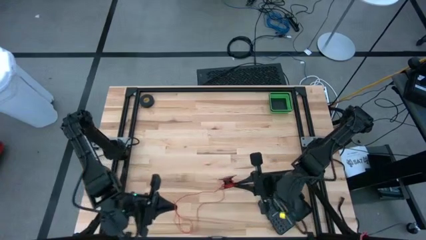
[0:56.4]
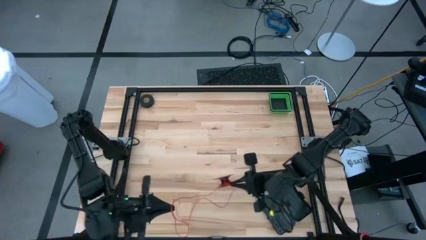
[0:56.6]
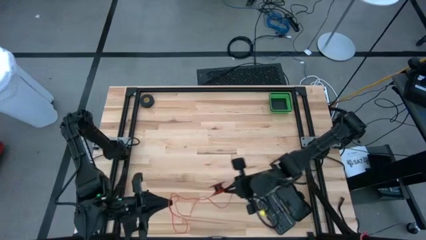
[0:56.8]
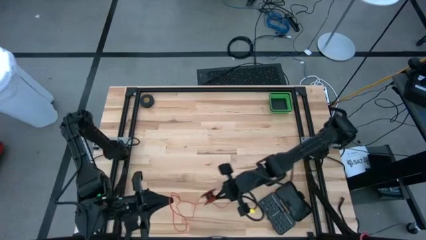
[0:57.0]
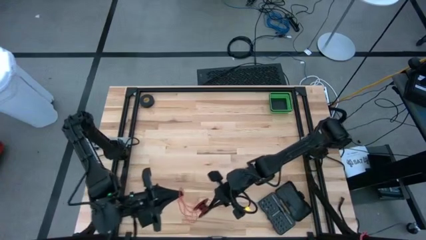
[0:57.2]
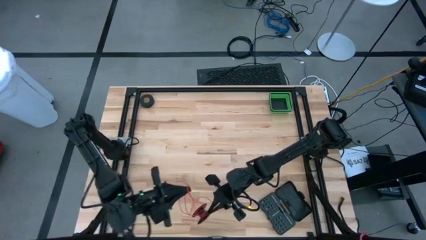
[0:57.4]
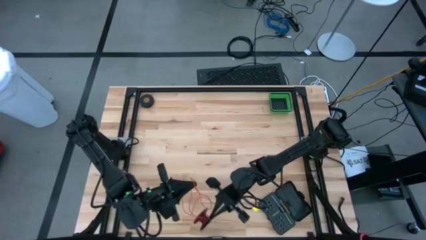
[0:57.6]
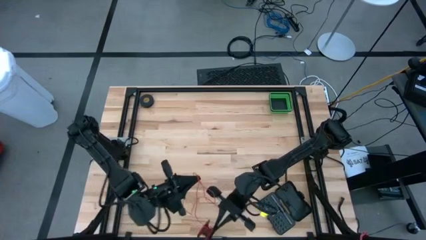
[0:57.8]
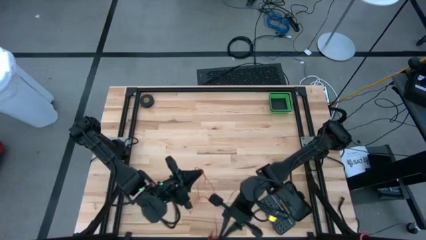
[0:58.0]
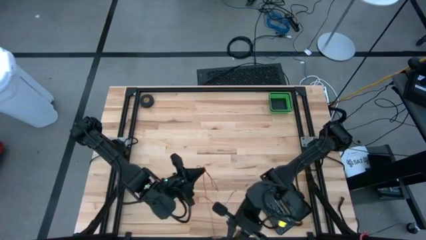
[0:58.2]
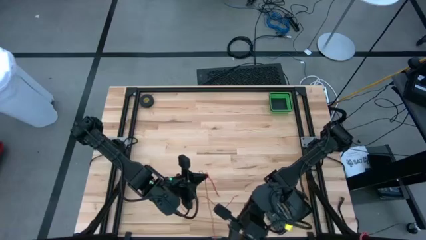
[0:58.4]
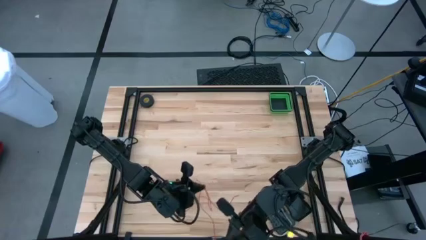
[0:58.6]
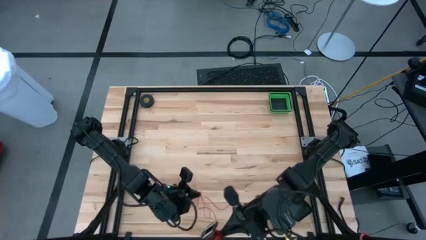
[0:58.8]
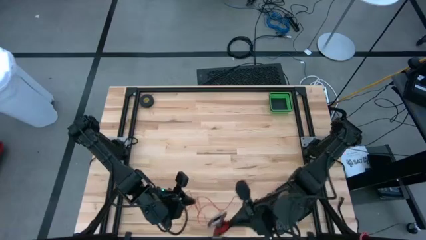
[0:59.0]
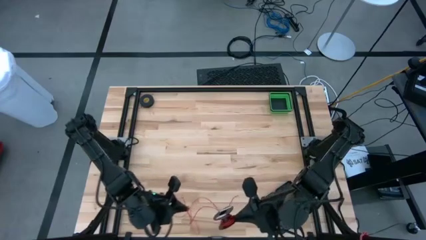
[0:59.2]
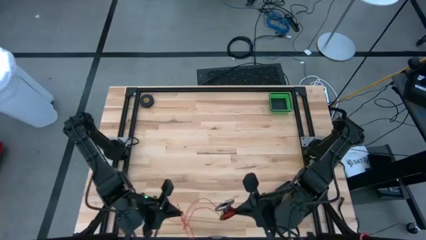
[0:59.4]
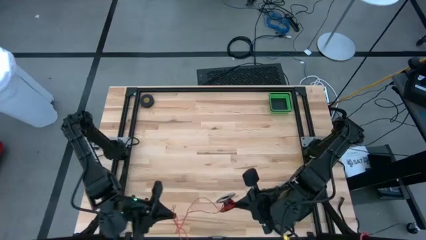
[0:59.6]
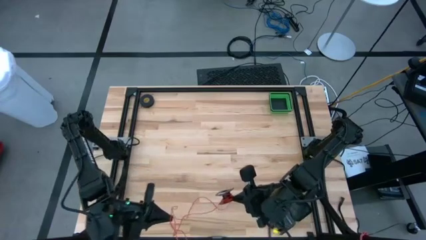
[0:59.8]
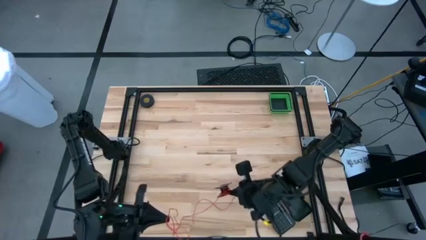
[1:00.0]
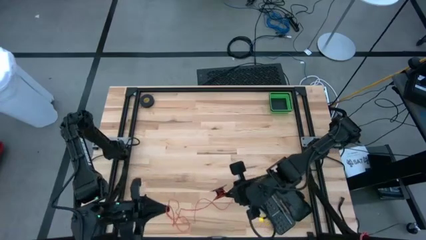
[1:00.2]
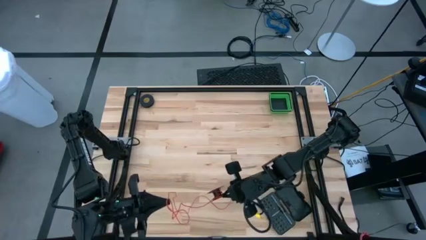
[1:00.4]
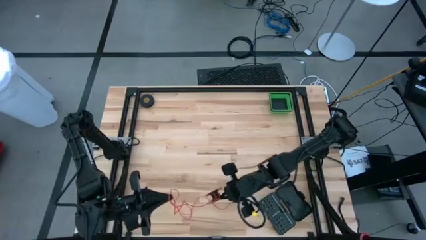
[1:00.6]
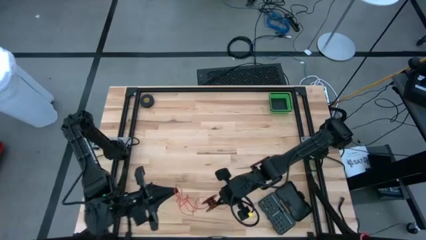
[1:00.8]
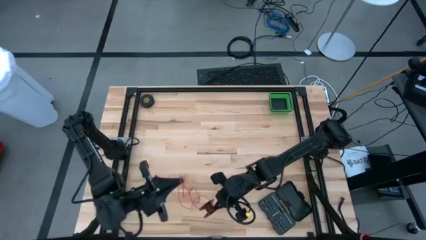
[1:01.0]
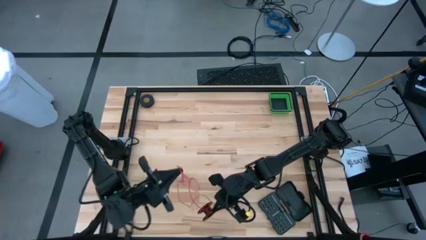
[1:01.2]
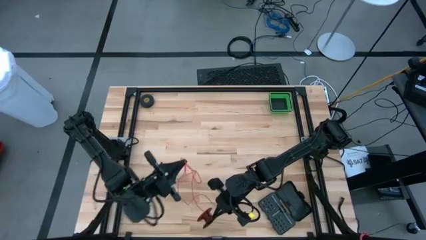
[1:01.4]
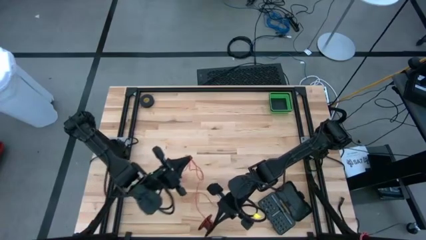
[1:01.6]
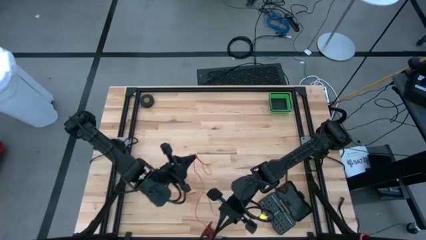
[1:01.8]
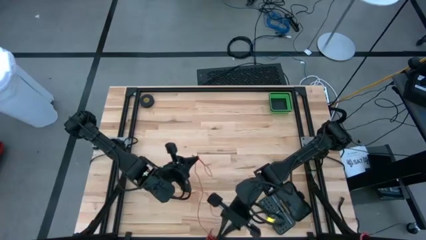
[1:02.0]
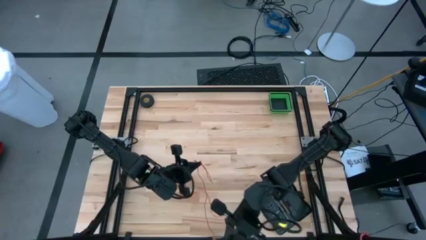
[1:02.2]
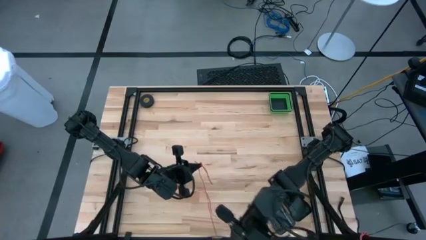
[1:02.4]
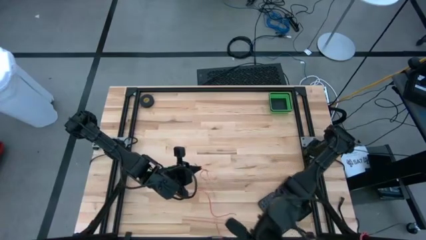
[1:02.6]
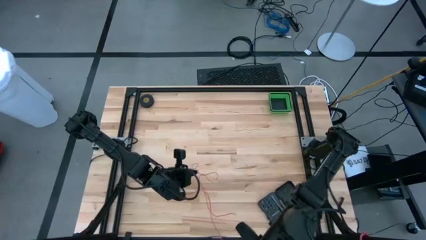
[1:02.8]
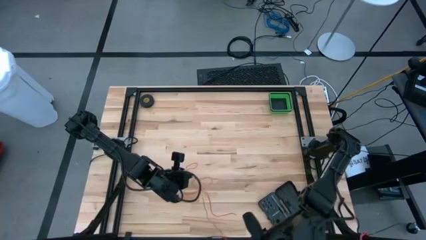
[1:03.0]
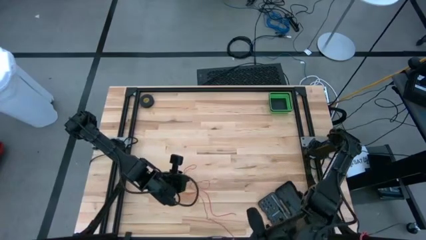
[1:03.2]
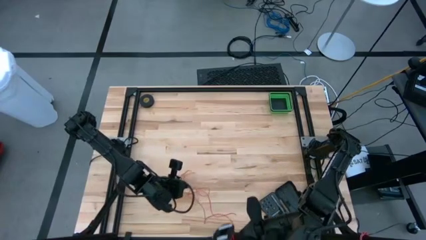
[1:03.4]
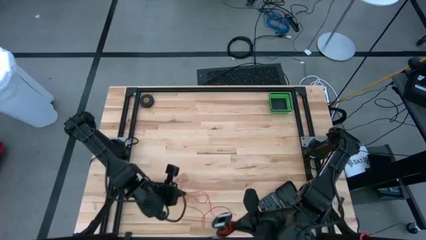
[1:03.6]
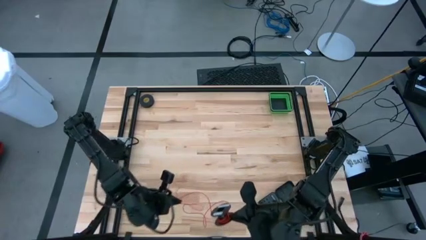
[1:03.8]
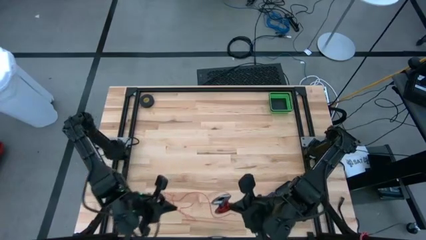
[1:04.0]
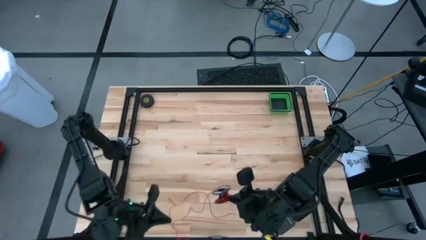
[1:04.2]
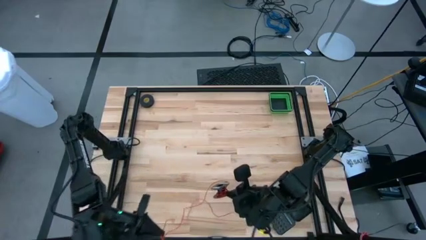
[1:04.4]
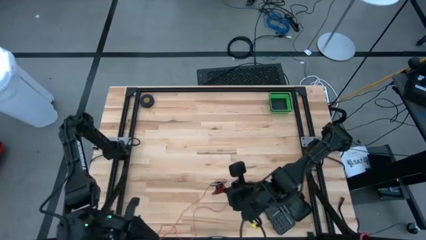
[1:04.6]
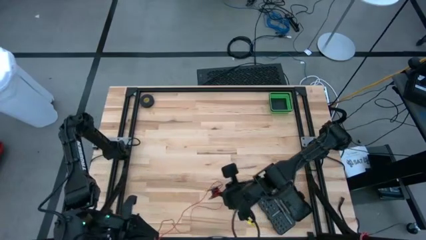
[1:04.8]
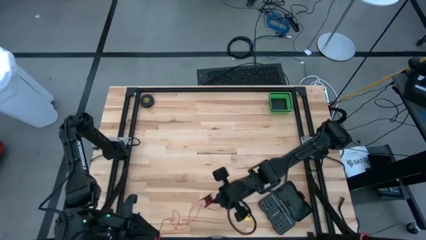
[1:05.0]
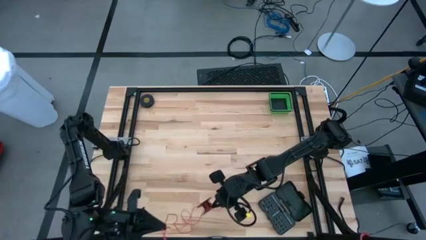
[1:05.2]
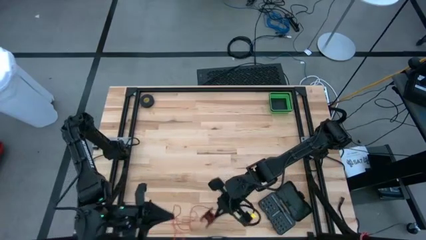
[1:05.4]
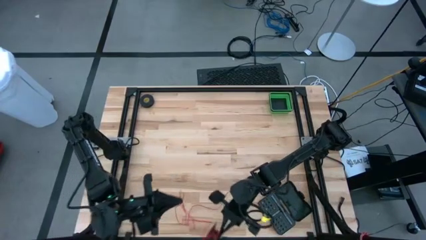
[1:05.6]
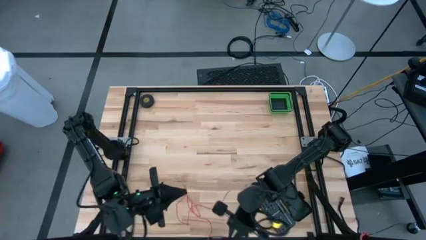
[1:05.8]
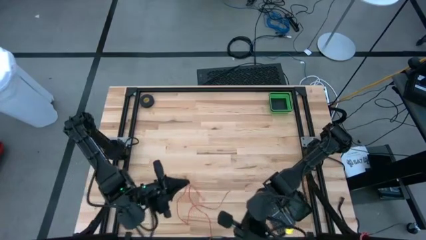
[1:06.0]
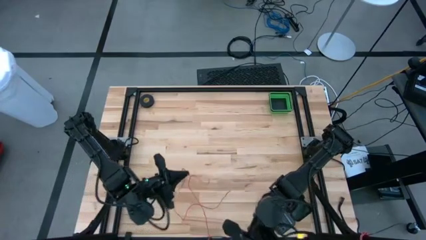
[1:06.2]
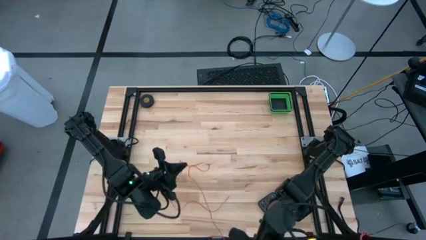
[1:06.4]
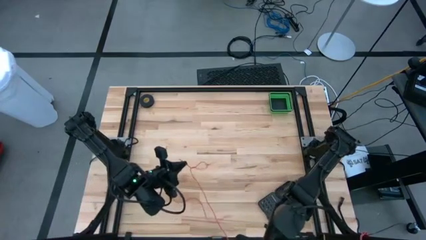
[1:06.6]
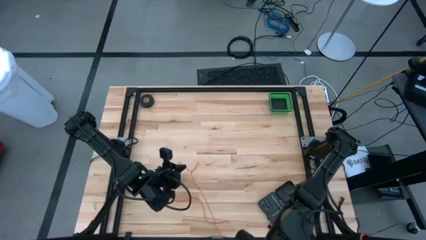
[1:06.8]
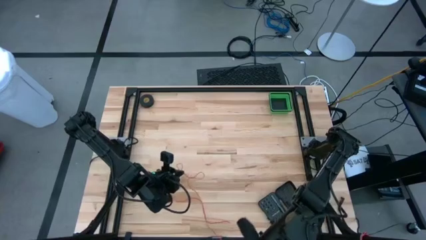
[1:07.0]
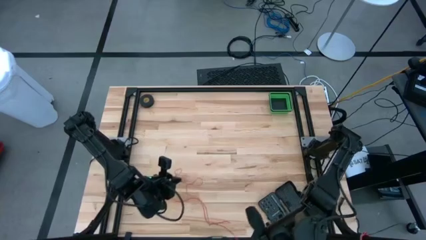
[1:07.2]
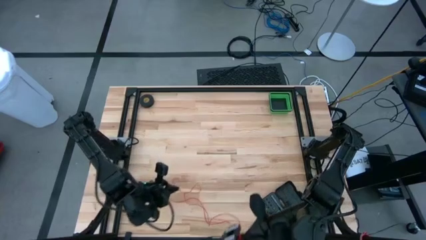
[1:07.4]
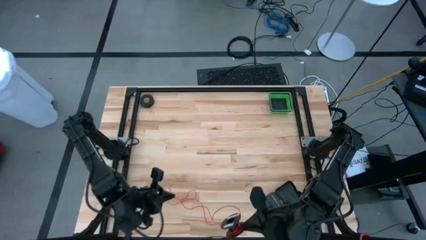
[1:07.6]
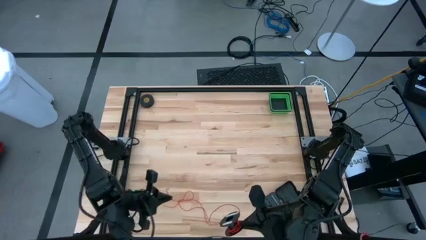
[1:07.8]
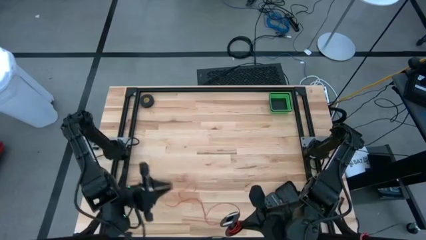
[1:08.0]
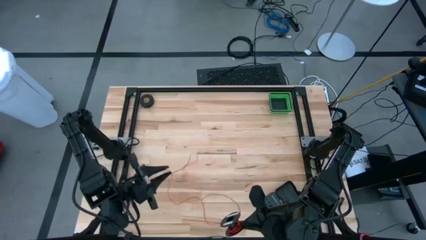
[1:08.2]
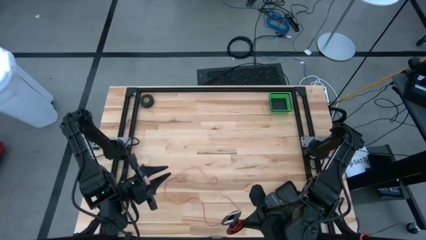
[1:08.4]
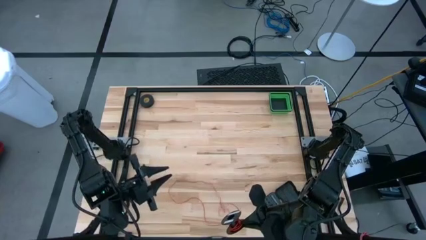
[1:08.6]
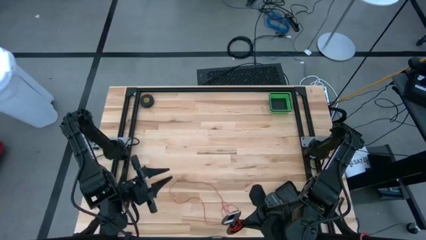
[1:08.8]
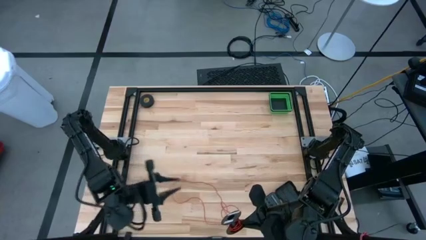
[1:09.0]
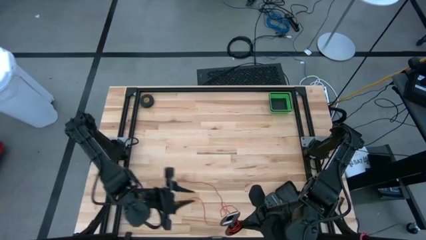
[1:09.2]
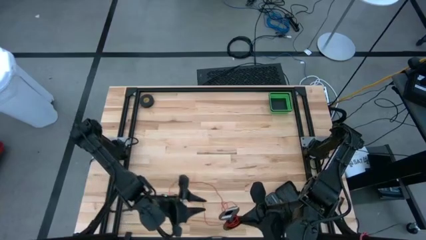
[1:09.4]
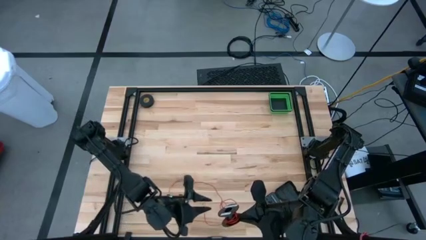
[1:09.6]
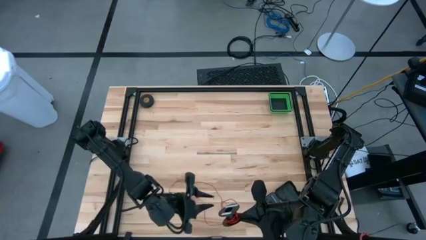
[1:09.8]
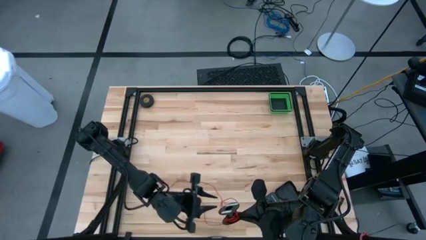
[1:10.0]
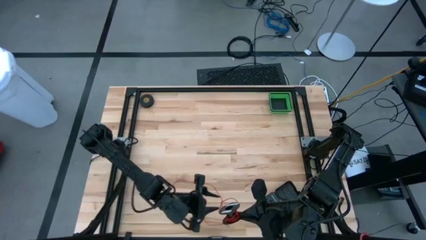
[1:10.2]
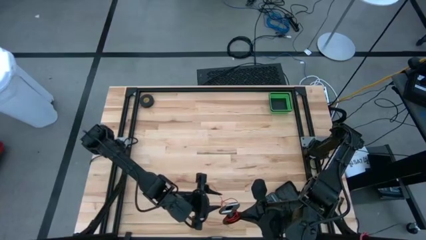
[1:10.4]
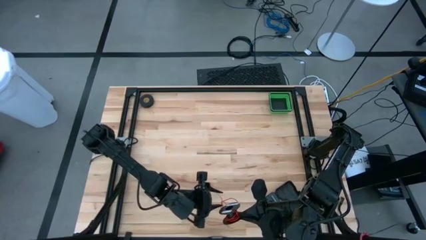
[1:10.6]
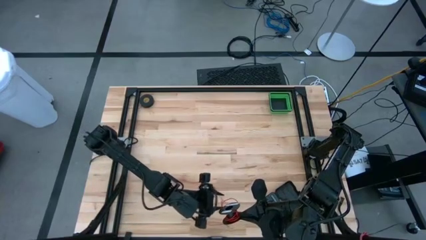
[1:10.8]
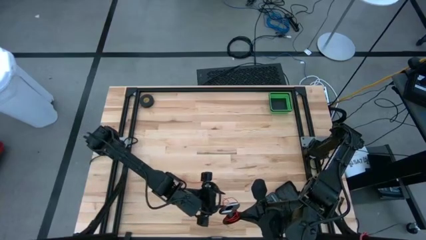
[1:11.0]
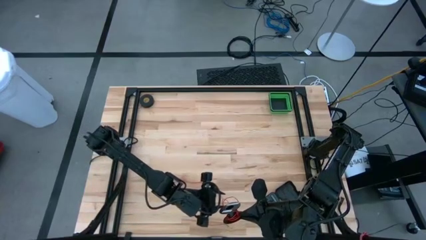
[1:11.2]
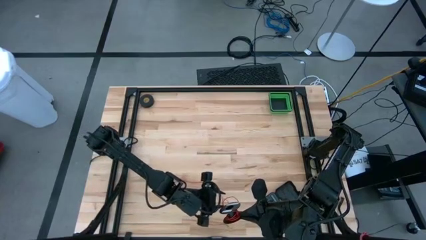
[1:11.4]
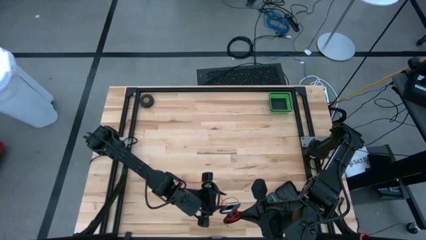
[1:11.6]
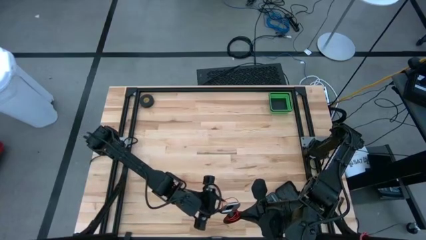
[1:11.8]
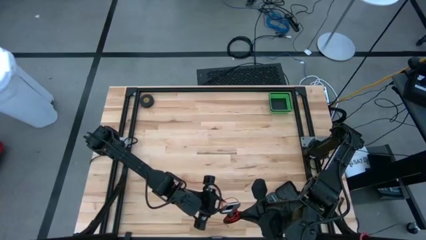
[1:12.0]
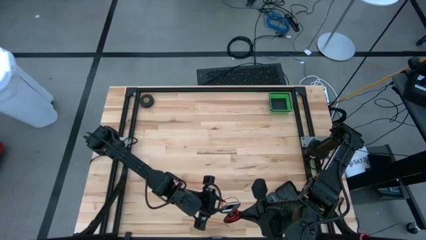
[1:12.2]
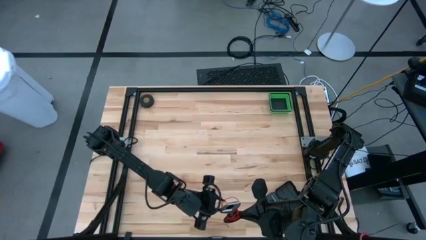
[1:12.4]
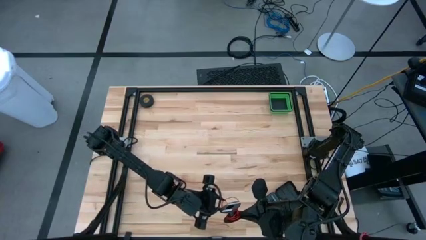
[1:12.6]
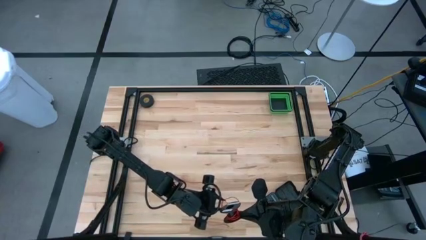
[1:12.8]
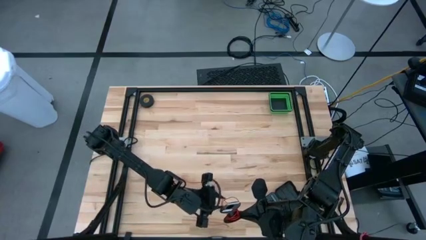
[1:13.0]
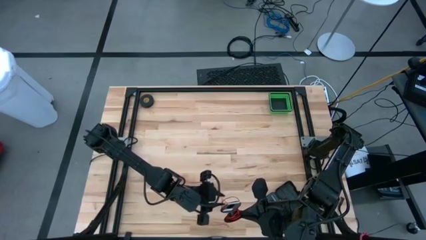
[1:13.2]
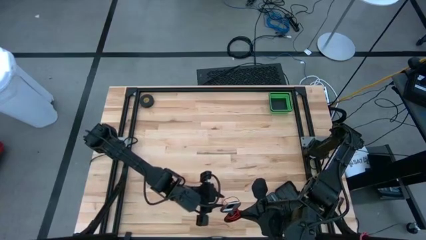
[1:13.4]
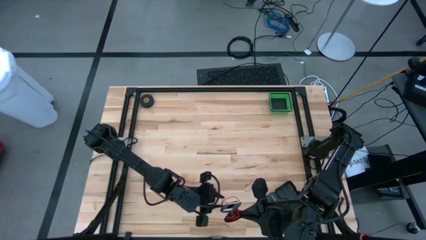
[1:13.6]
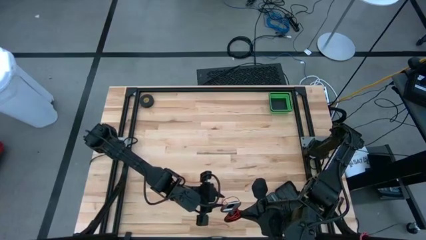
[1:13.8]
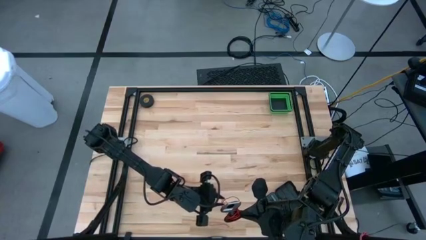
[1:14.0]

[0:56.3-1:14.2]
Task: Coil cords
Uncoil the red wire on the black spool
